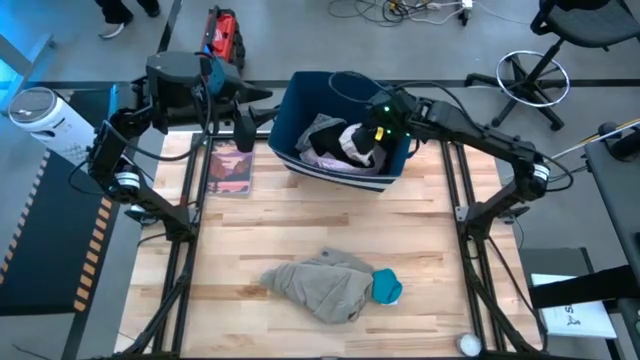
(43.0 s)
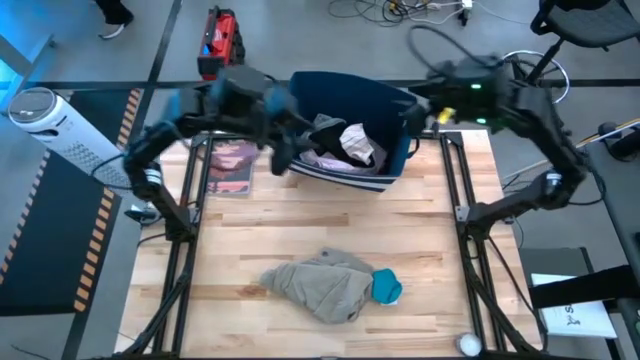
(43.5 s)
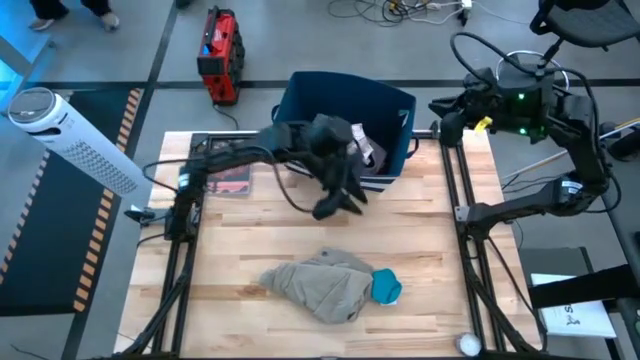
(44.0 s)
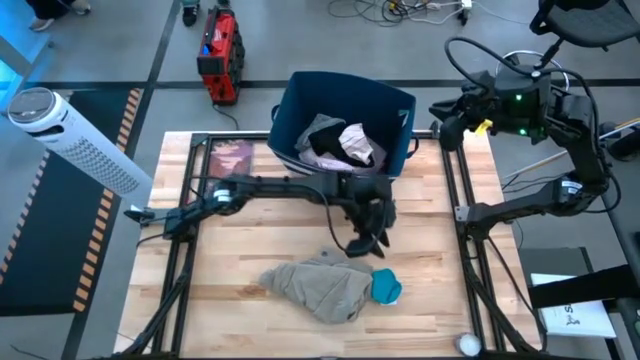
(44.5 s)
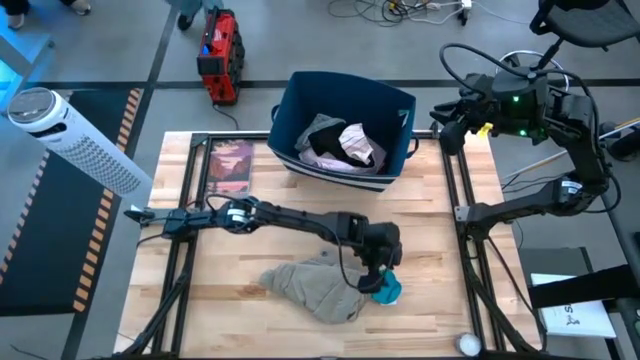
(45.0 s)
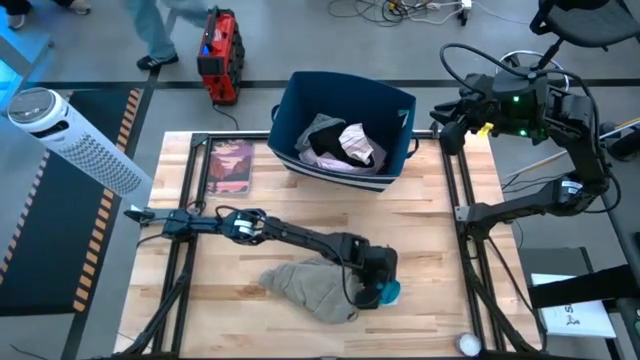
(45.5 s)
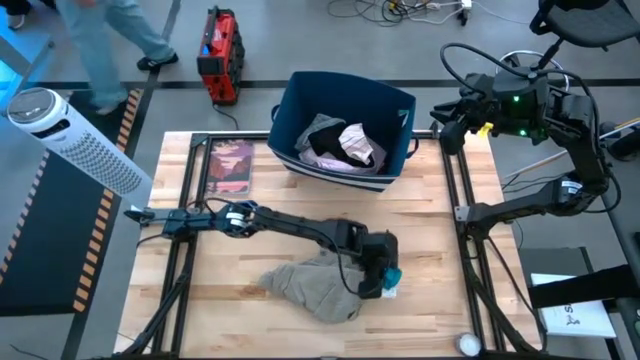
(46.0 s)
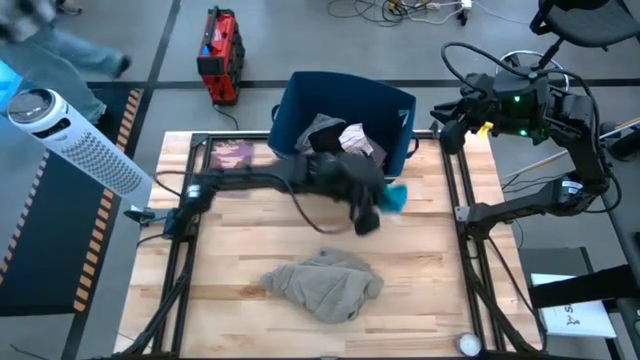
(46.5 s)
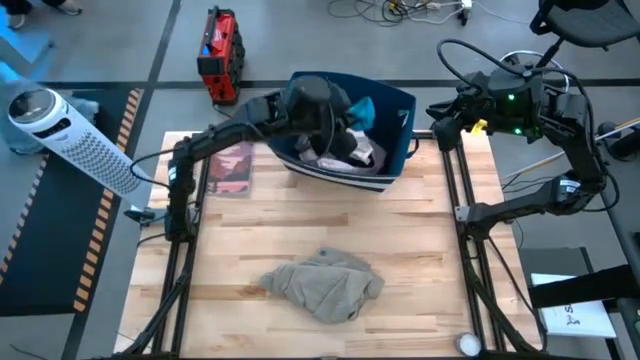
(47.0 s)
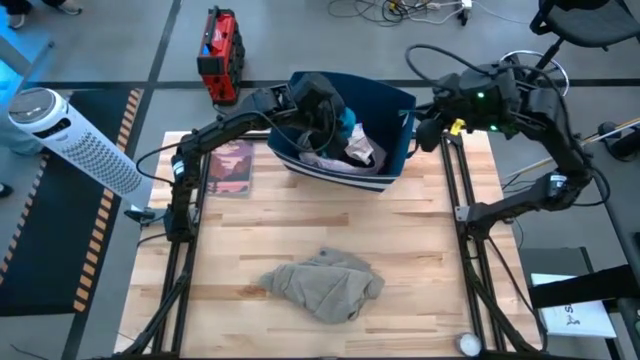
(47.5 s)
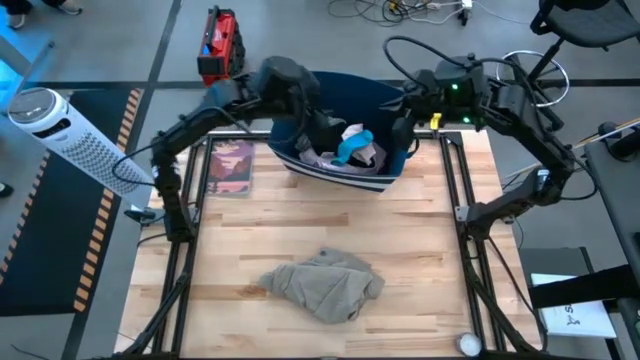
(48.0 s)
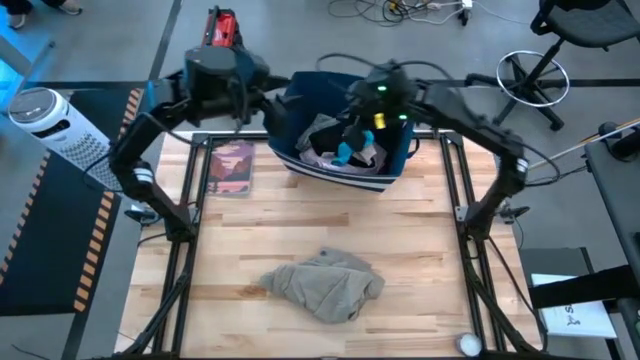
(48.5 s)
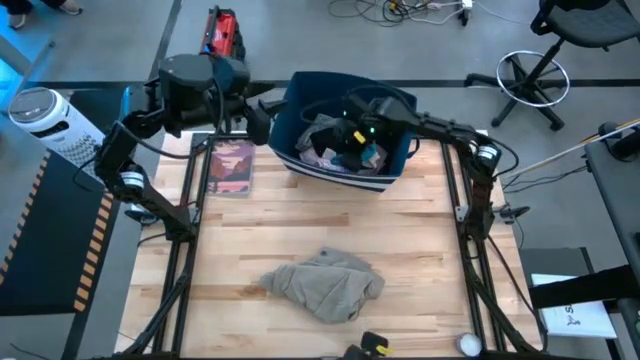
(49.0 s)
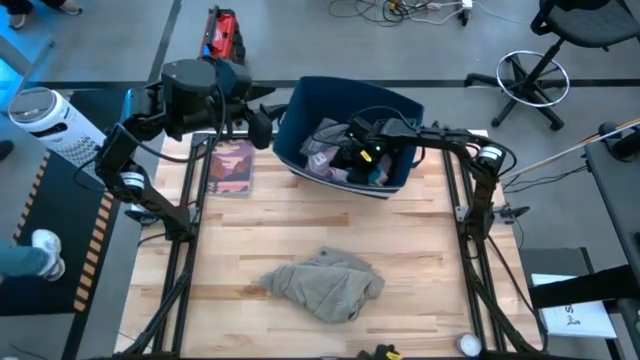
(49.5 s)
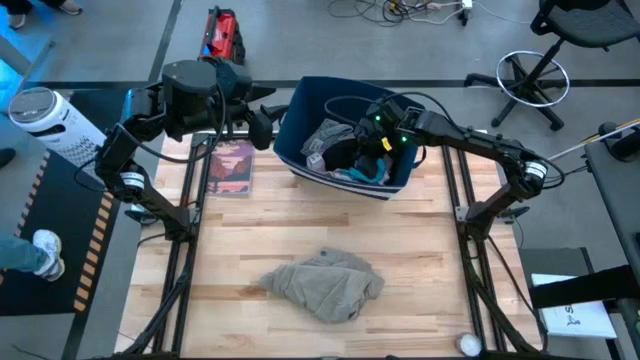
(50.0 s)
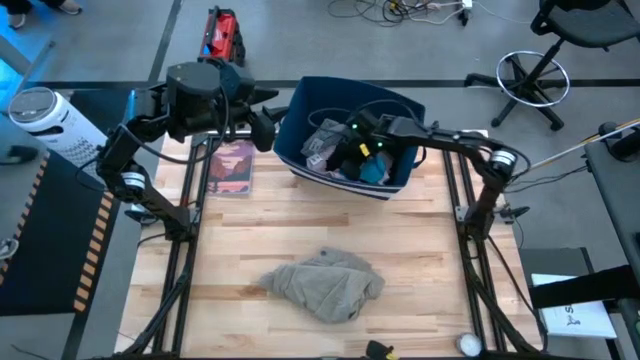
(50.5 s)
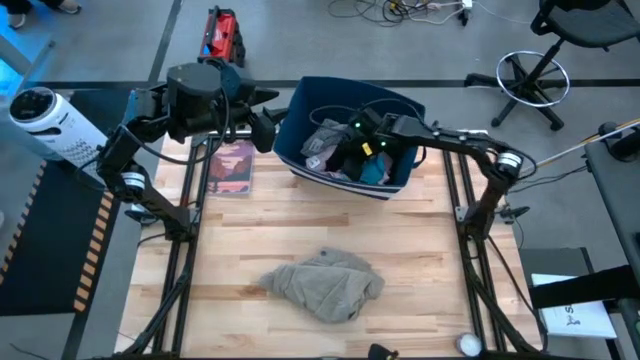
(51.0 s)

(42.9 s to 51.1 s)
Task: Sort clothes
Put the blue sock into the blue laundry bin

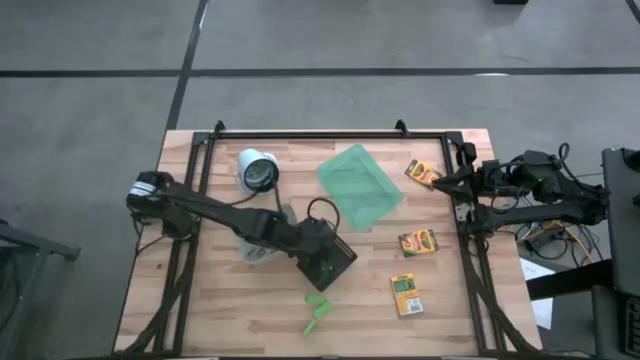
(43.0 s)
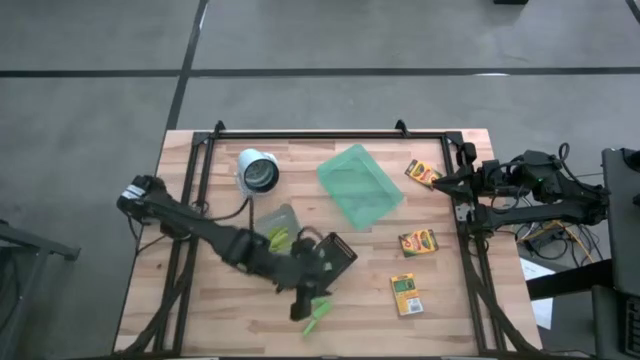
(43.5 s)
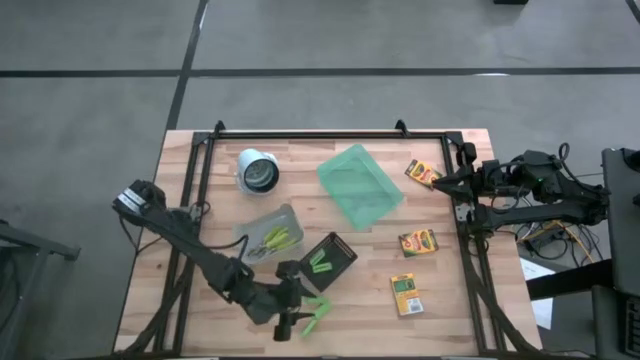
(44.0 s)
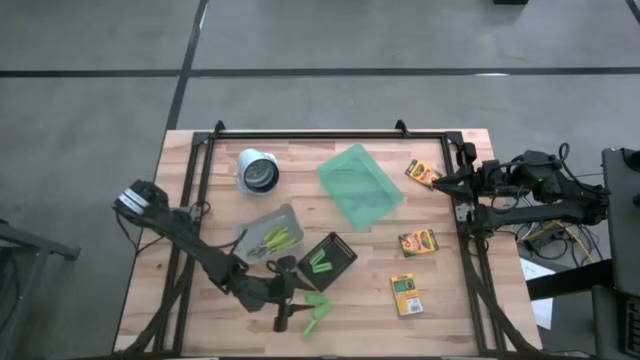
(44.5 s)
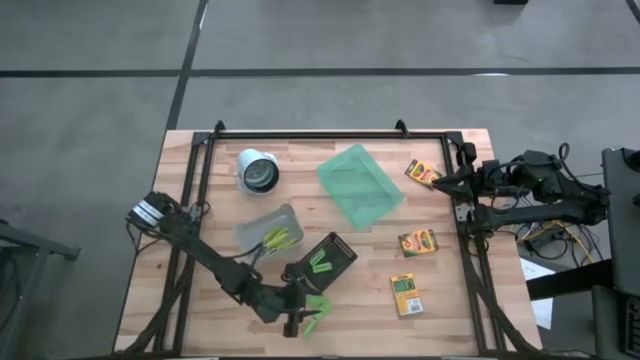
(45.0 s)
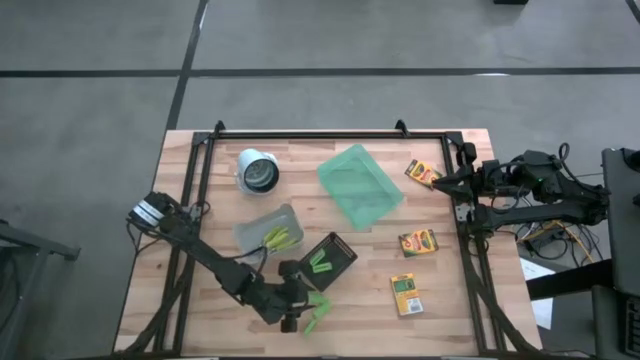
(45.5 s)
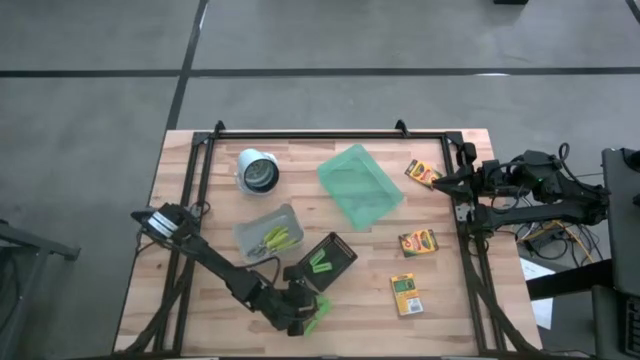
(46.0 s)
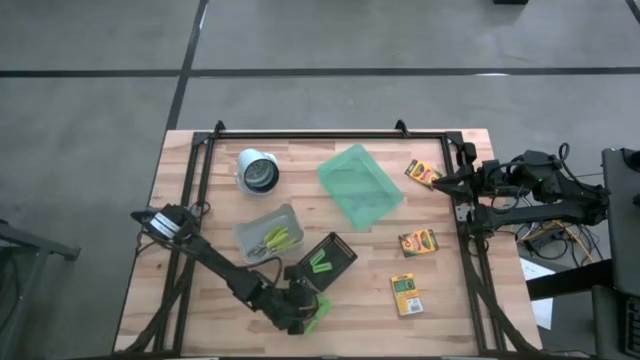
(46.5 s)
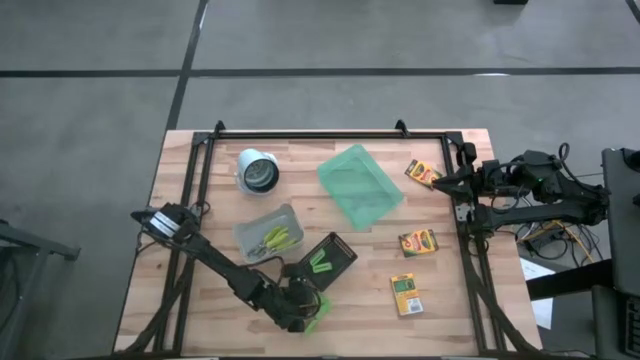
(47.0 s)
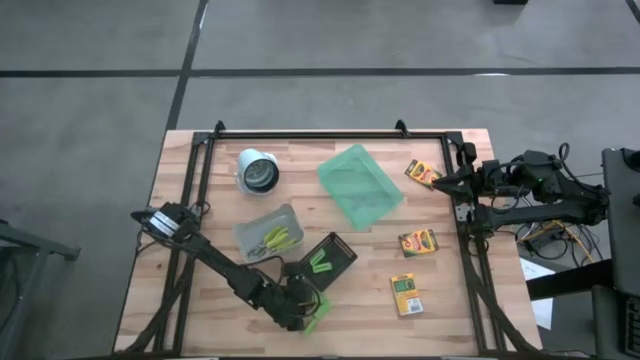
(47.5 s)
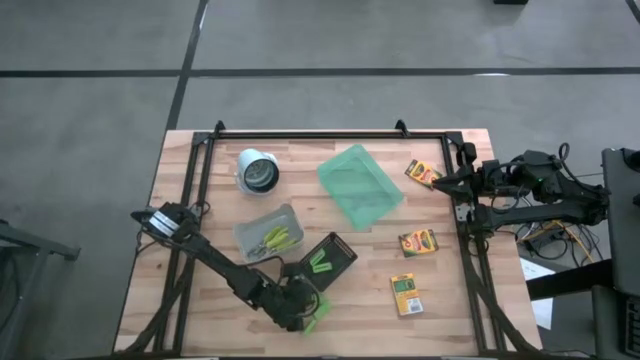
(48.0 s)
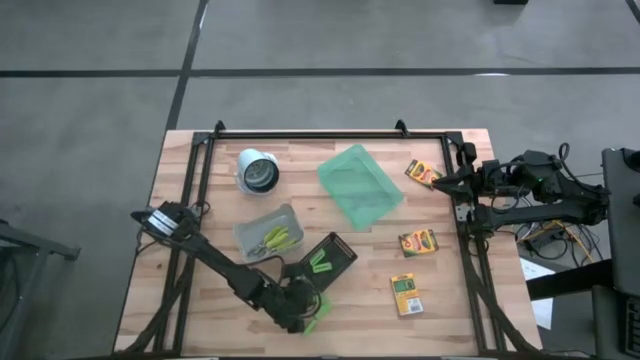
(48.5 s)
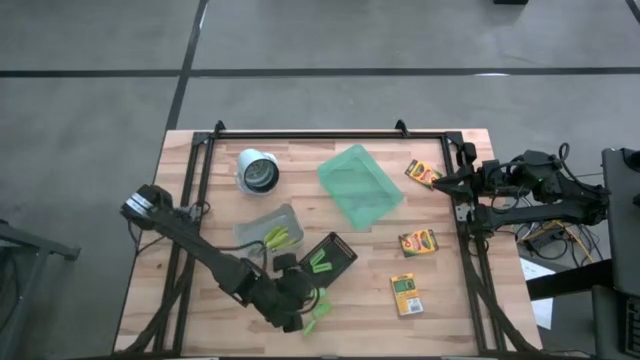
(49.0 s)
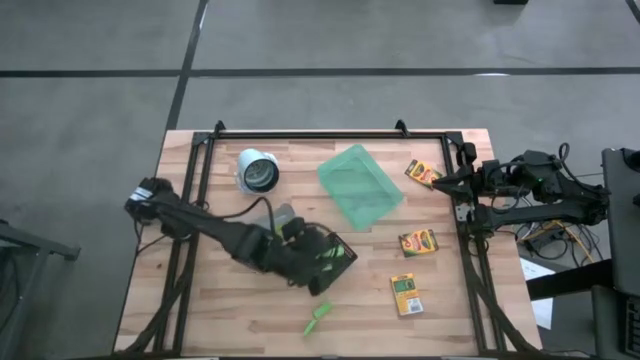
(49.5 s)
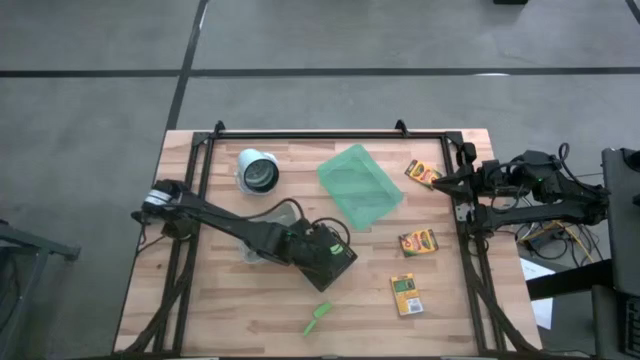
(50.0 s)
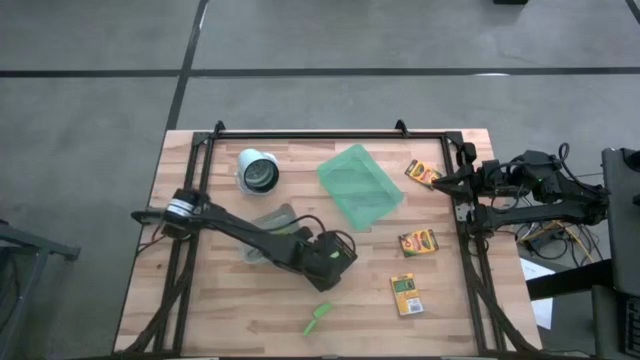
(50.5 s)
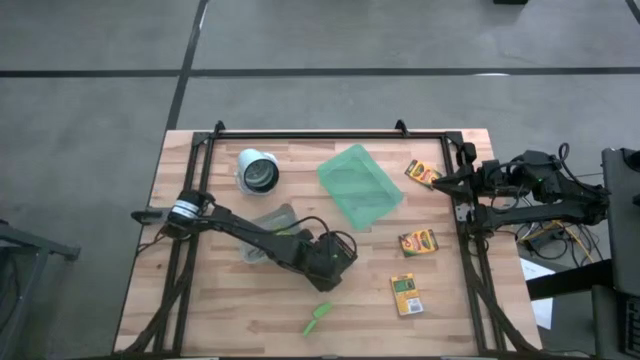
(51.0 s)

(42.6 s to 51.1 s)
Task: Pick & Place School Supplies
Put the green eraser into the black bin

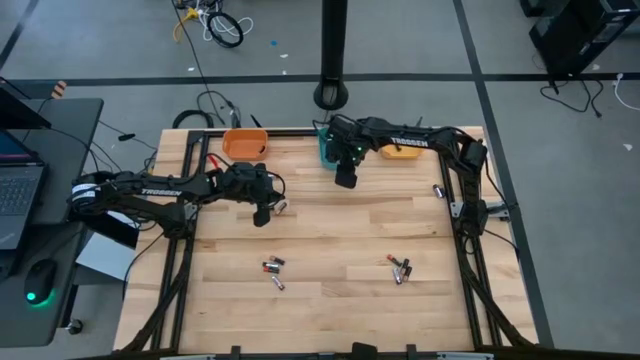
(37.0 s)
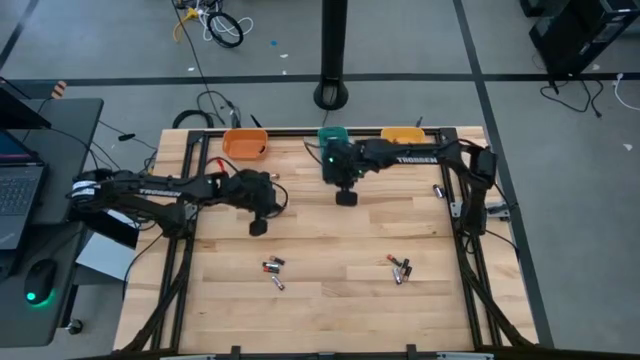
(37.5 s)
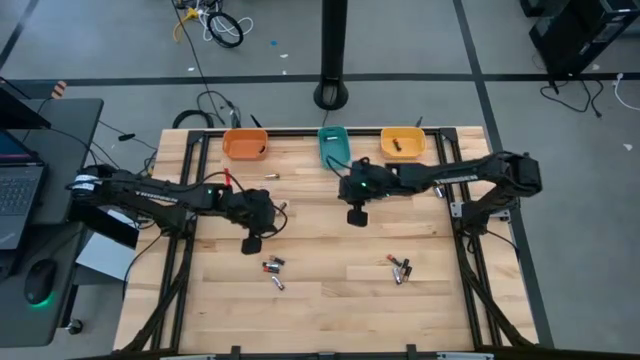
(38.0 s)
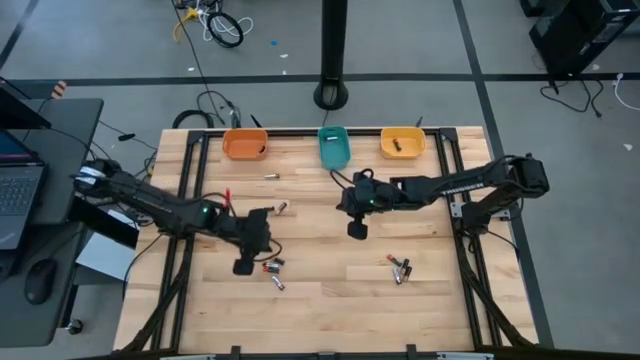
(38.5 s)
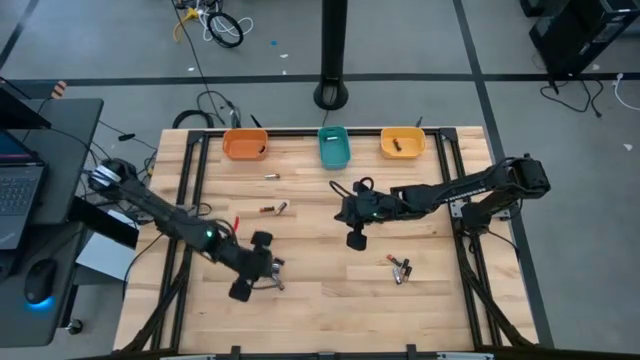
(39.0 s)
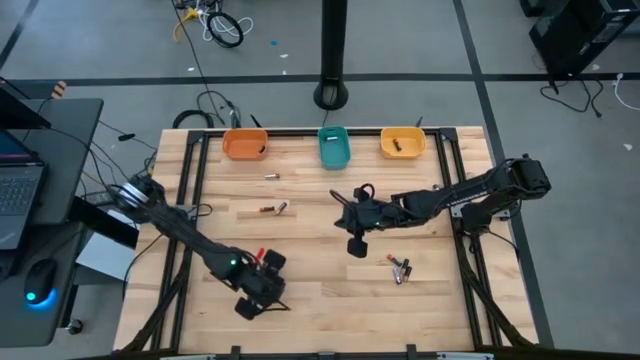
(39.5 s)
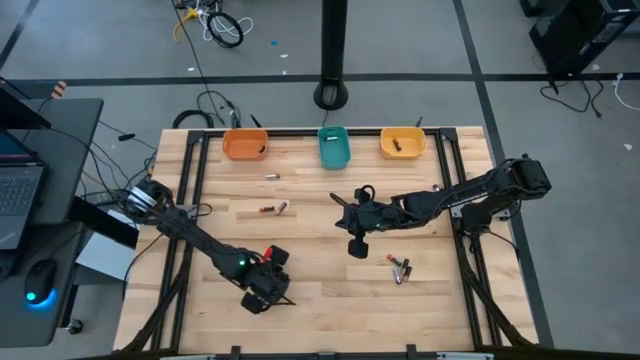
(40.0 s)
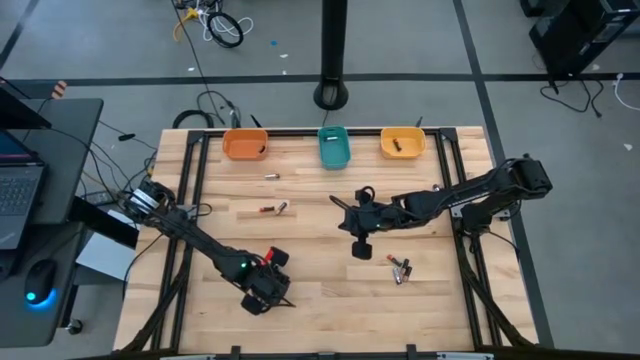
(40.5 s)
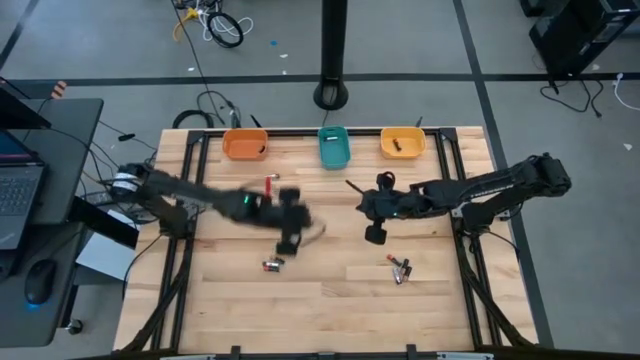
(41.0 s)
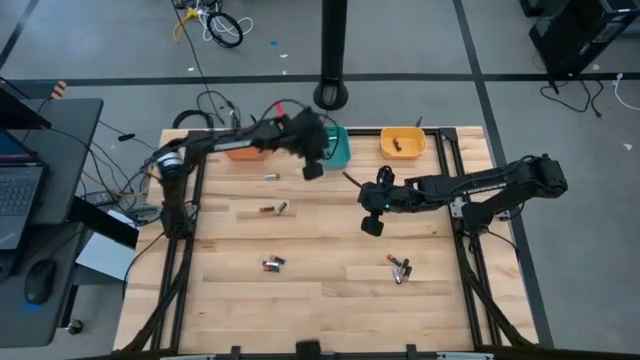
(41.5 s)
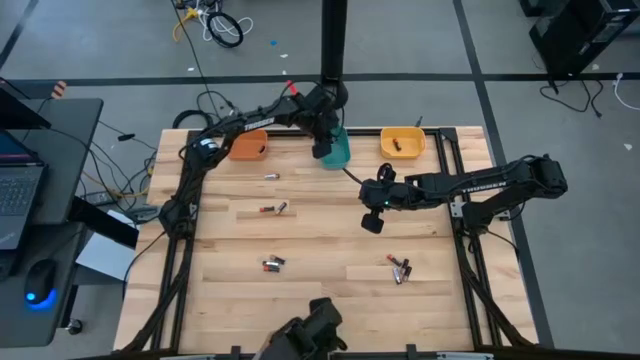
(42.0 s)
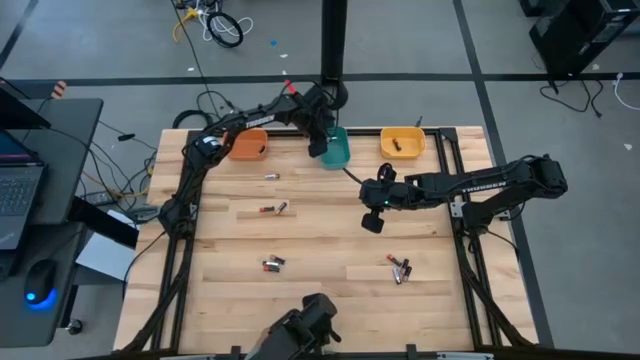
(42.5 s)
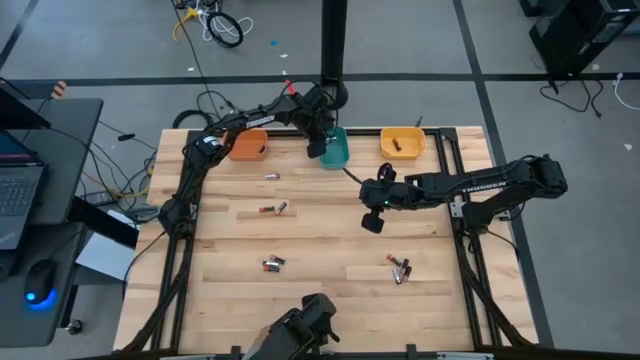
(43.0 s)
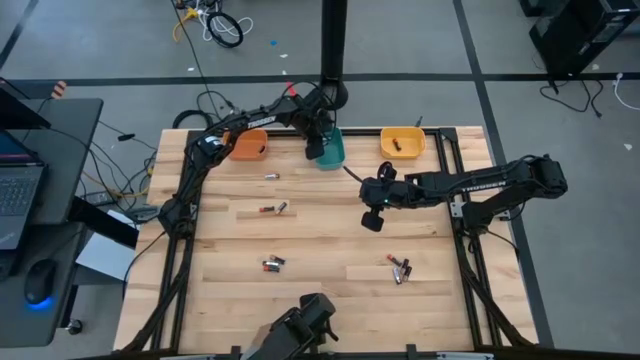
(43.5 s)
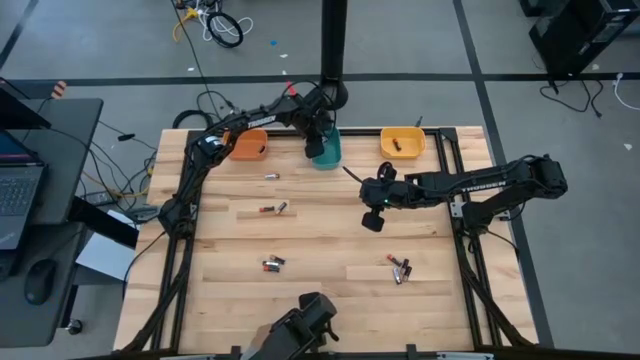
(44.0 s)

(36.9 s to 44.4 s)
Task: Sort batteries
Put the black-silver battery in the green bin
